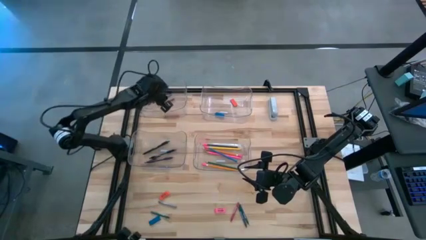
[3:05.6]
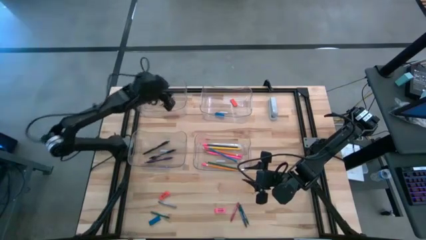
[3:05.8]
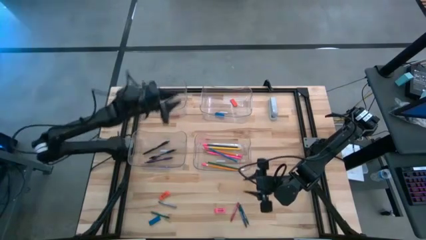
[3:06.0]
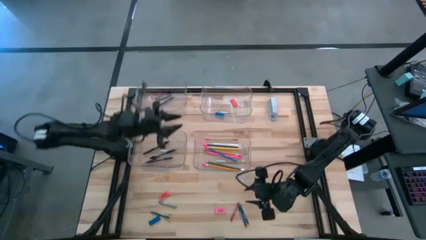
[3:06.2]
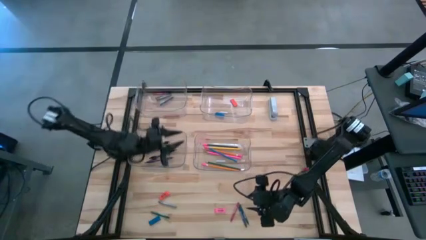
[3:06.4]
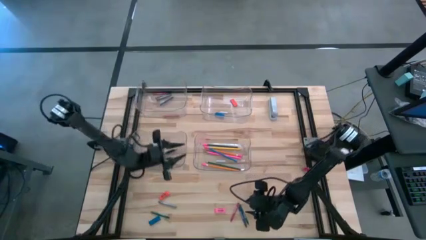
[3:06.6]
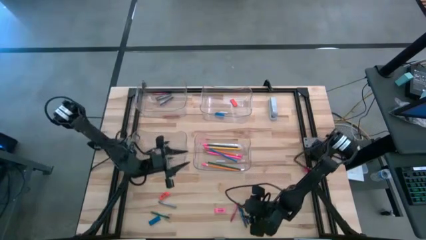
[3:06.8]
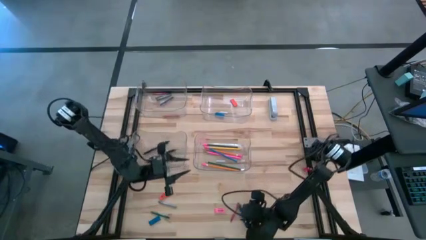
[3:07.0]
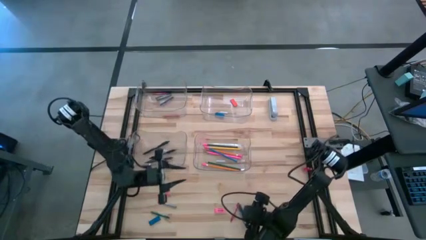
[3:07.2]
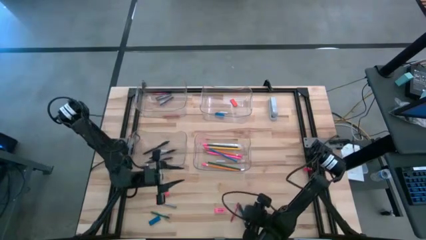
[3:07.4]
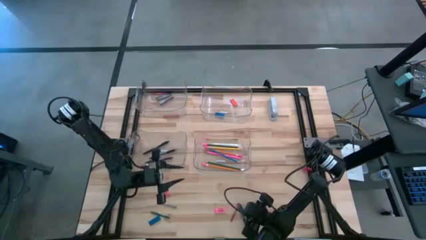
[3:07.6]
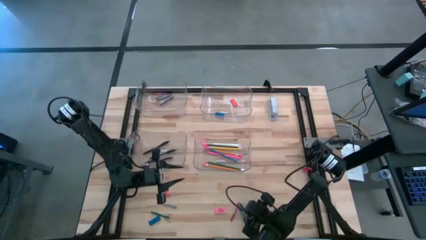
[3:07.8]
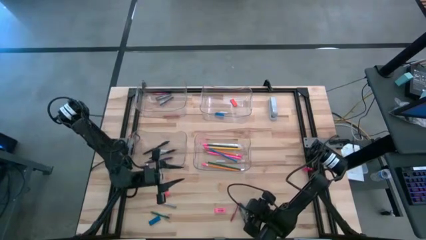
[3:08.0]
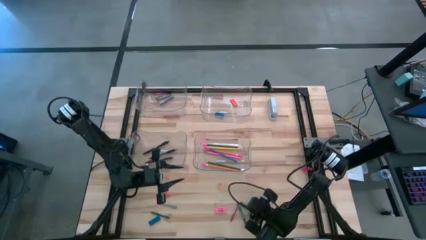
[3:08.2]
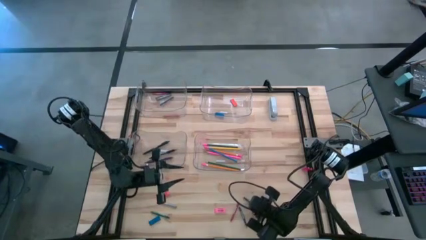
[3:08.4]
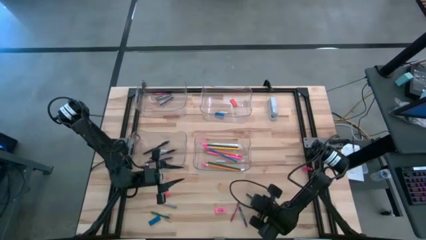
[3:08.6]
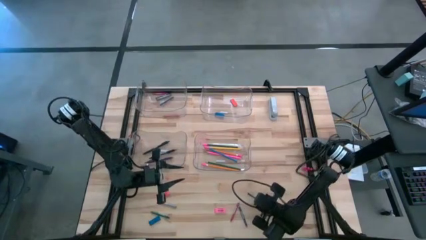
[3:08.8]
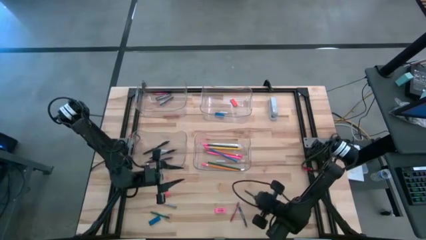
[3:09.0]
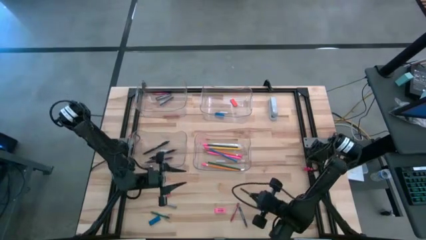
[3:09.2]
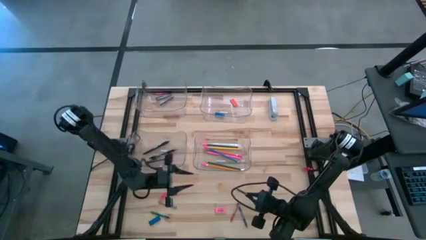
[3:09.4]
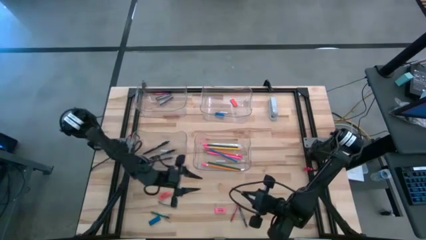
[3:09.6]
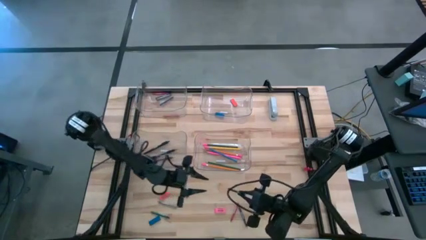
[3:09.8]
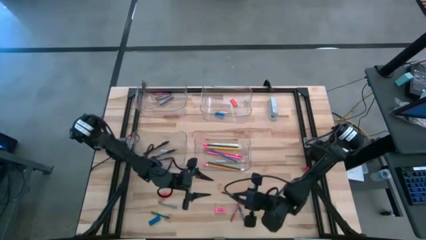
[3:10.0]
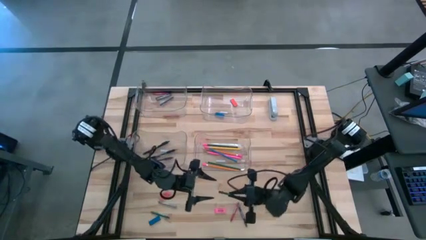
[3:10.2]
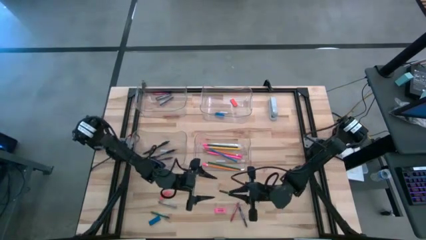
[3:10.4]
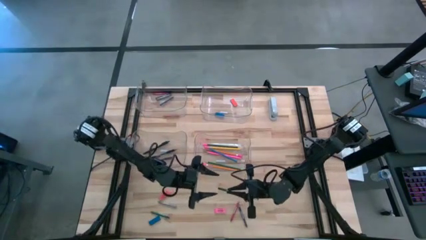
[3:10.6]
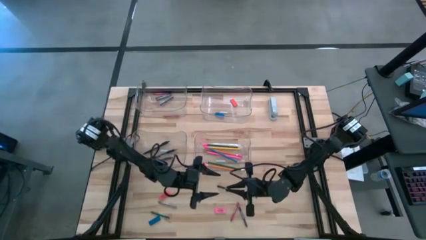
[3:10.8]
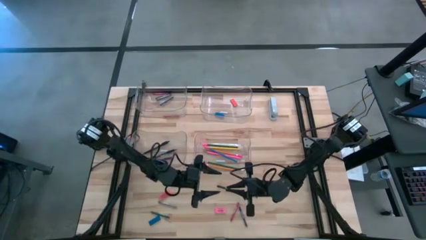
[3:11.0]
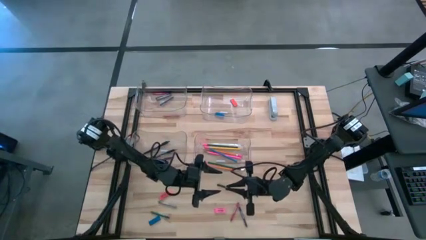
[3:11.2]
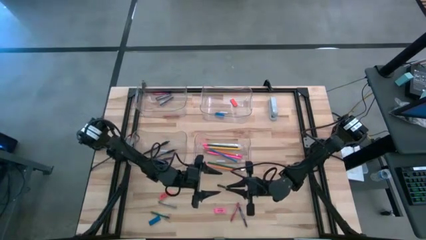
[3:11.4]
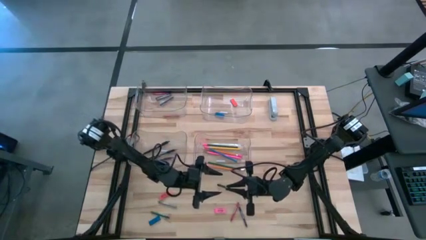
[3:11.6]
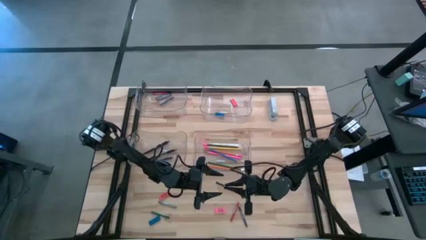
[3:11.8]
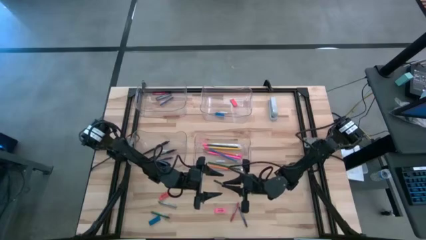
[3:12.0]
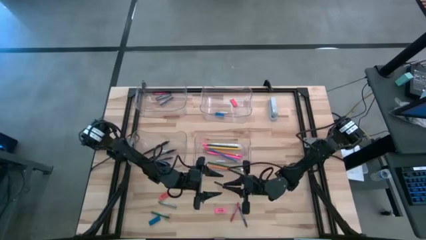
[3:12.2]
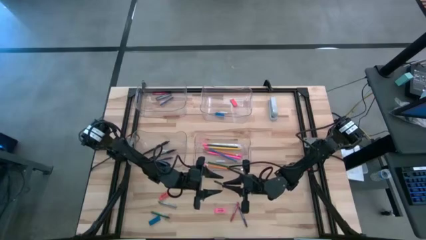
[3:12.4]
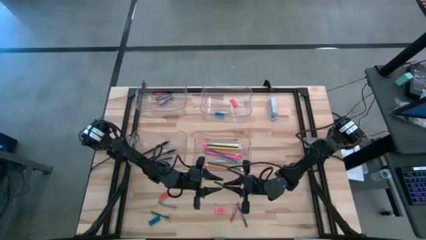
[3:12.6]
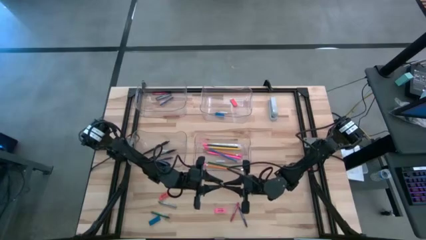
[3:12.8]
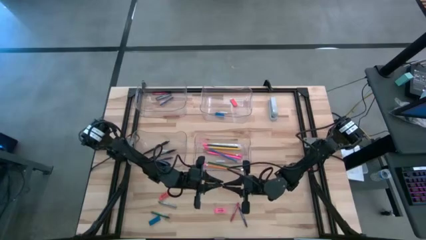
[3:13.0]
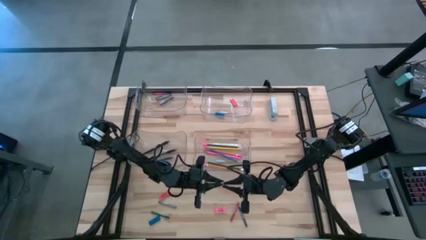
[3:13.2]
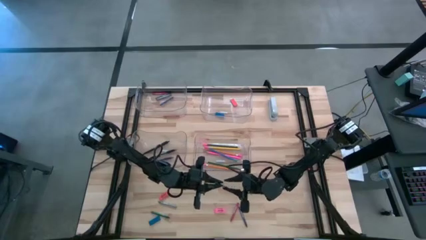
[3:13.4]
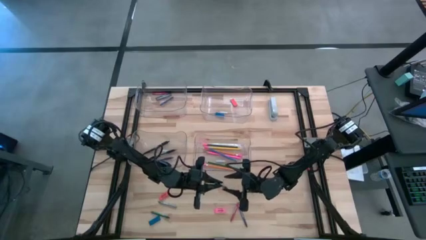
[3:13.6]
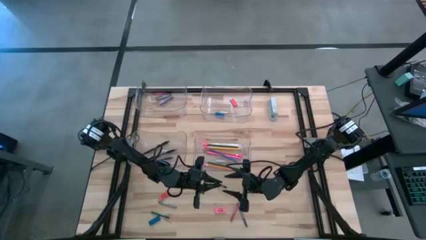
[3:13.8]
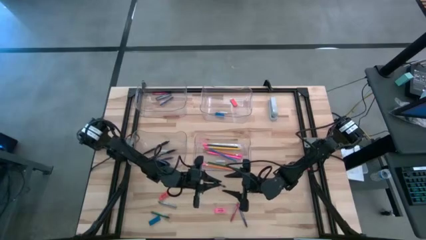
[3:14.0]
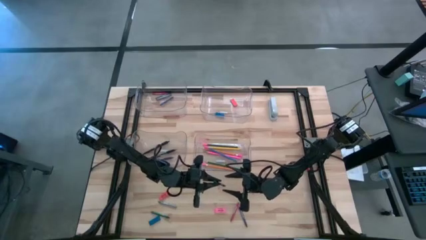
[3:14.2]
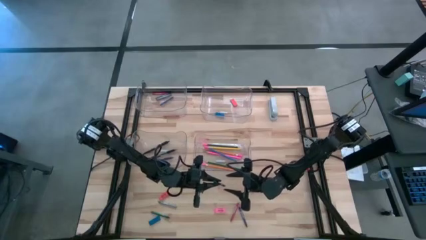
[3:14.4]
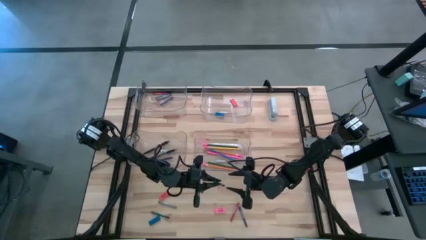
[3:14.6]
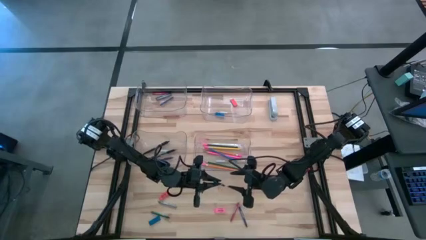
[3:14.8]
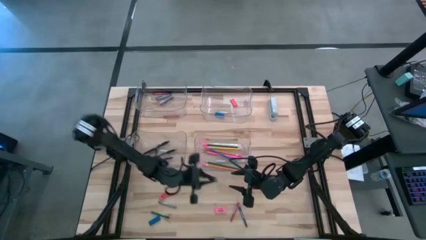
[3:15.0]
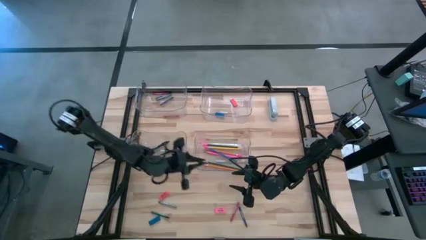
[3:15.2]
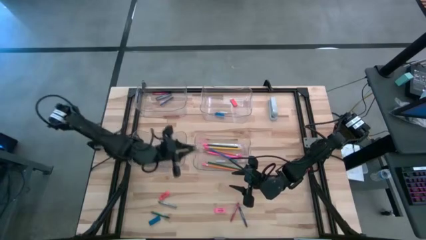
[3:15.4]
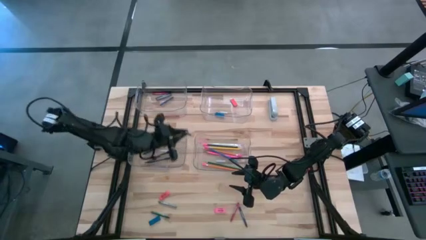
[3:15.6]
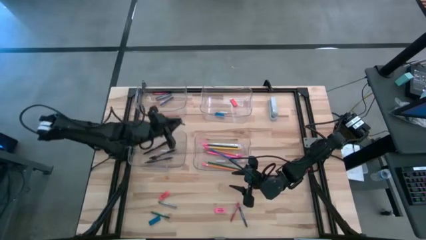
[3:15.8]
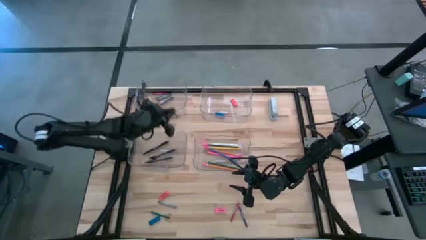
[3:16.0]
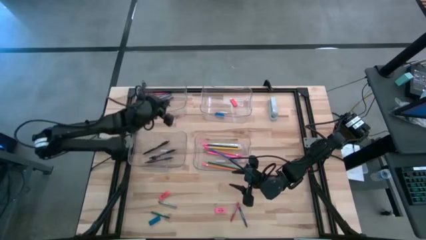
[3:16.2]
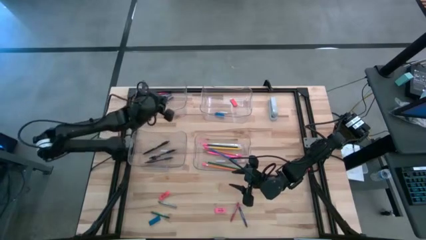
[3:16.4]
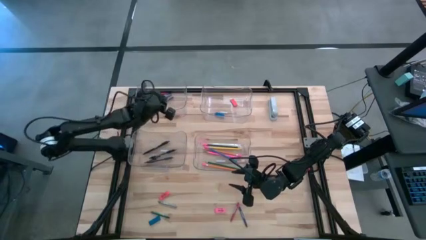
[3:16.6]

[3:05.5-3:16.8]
Task: Sort crayons/erasers/pens/pencils in bins
Put the right green crayon into the top left transparent bin
